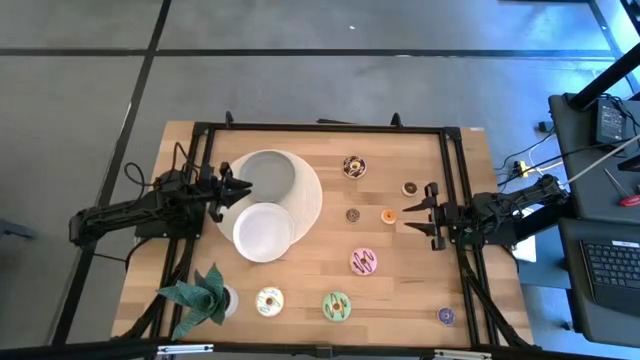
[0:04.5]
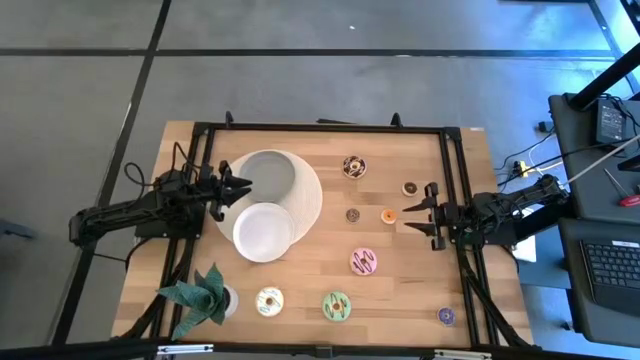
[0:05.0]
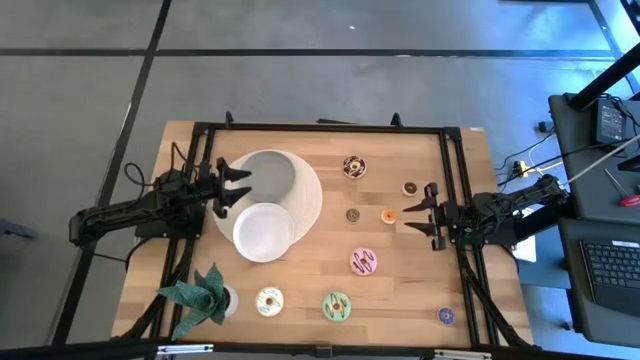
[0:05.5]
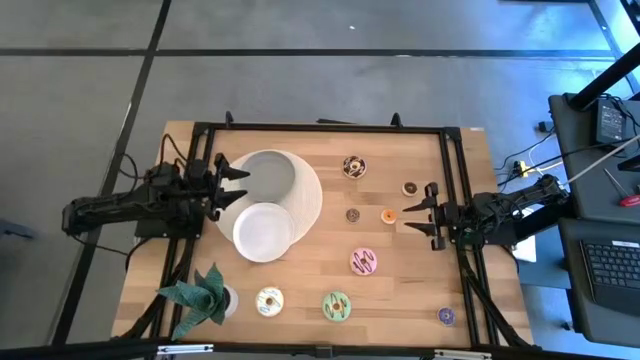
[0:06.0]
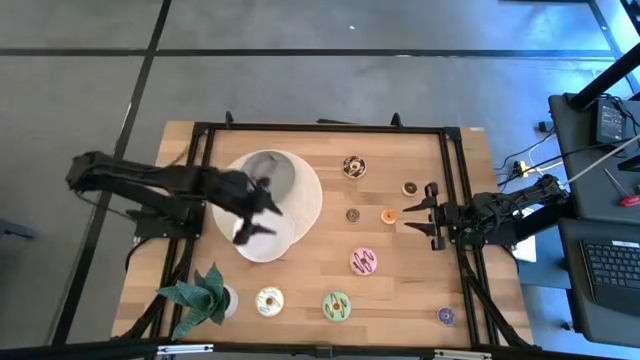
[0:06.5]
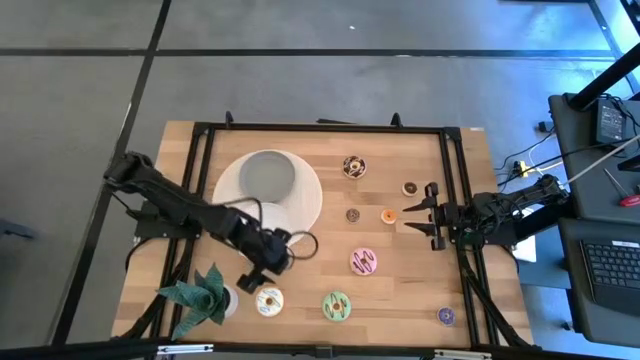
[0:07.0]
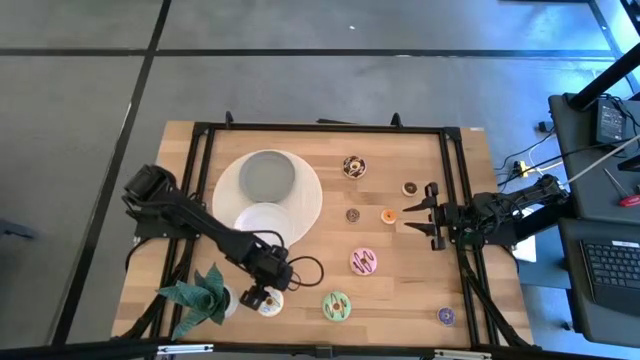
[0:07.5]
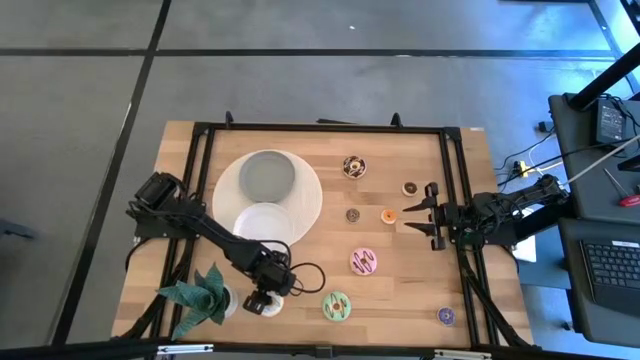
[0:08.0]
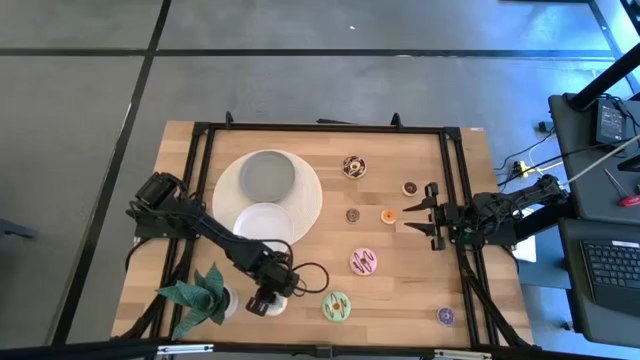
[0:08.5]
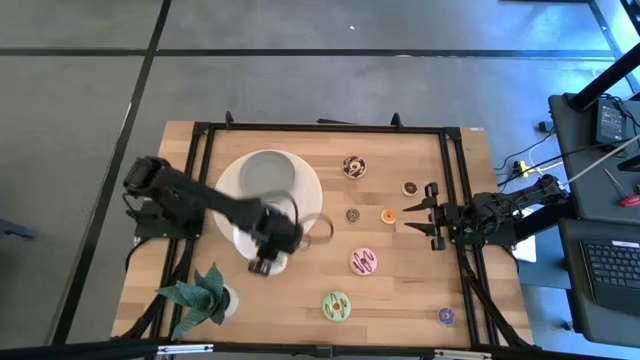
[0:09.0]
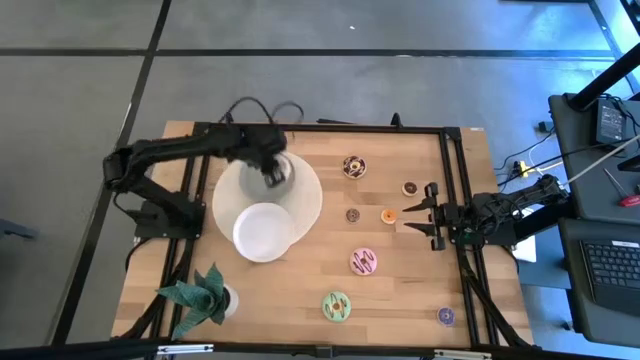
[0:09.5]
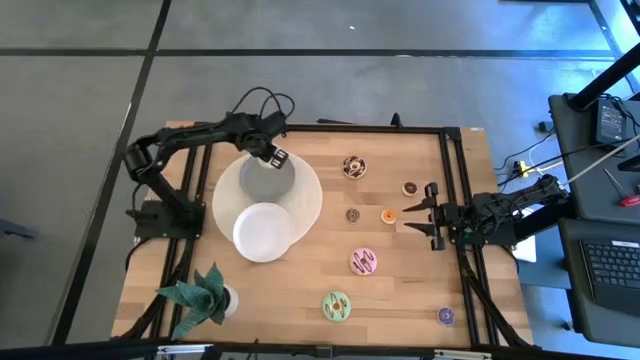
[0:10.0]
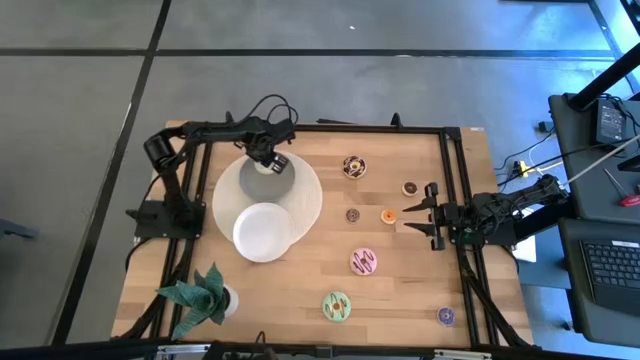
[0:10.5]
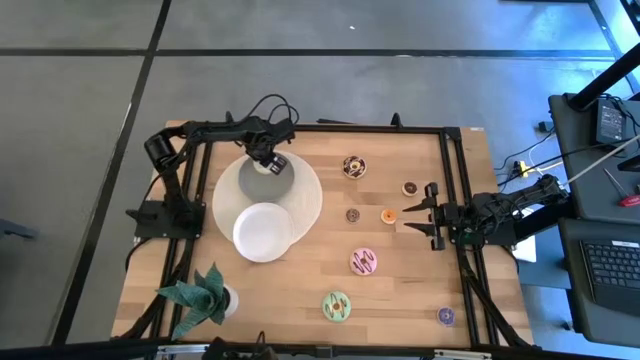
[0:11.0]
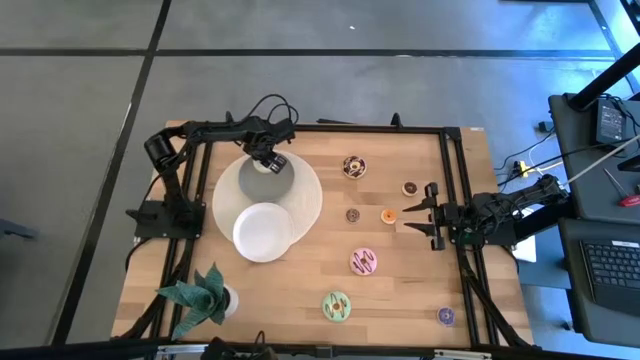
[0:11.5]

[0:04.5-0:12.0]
Task: Pick & Place donuts
Put the big white donut on the gray plate

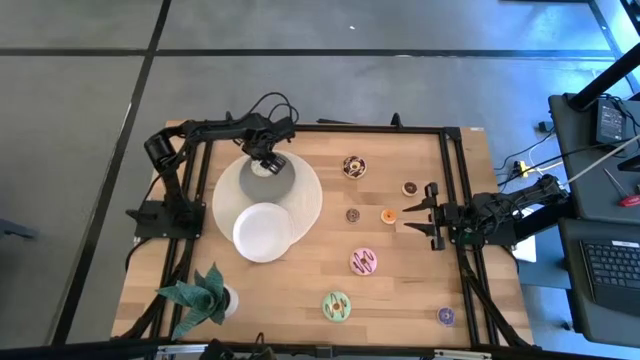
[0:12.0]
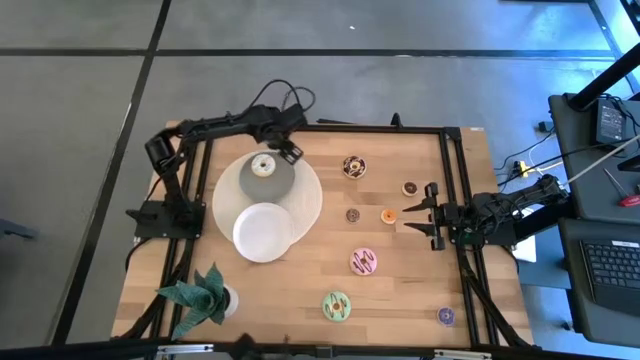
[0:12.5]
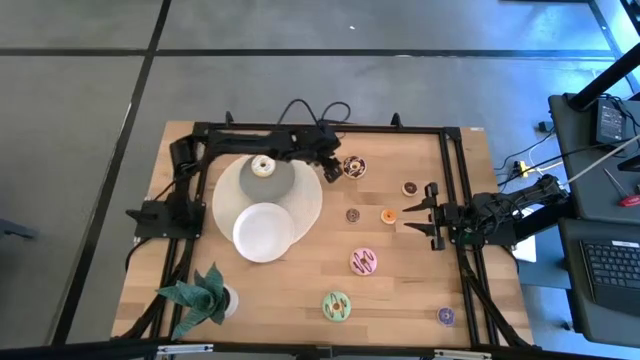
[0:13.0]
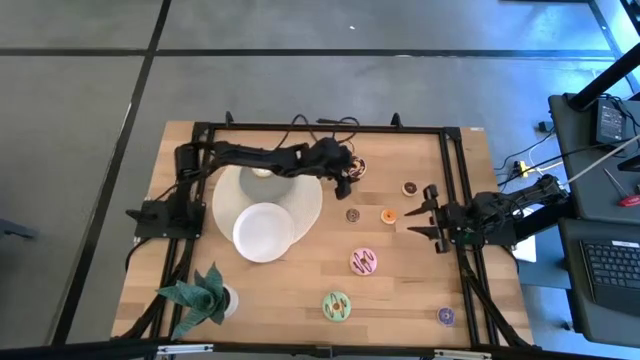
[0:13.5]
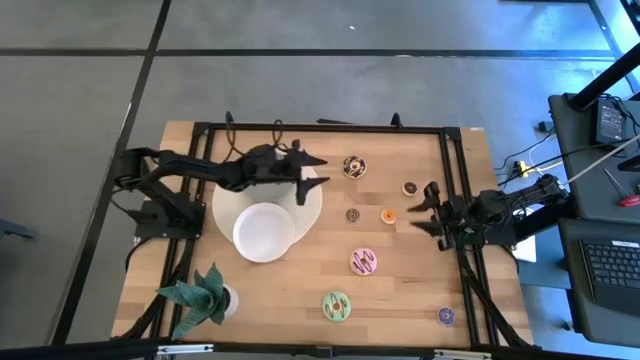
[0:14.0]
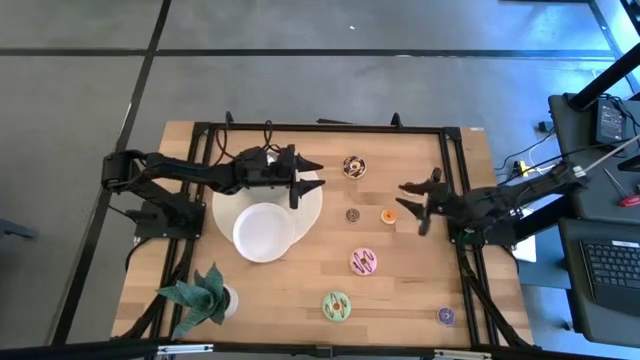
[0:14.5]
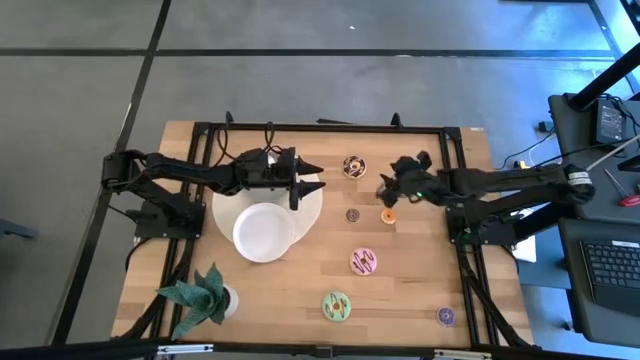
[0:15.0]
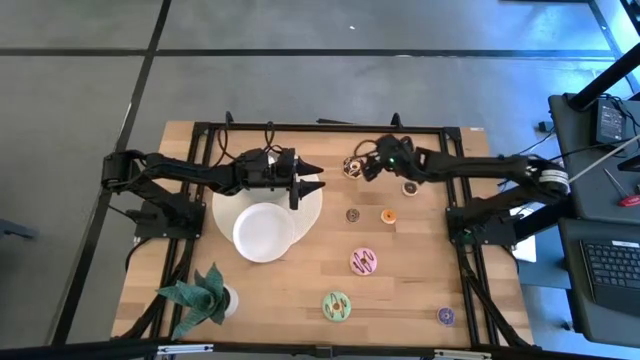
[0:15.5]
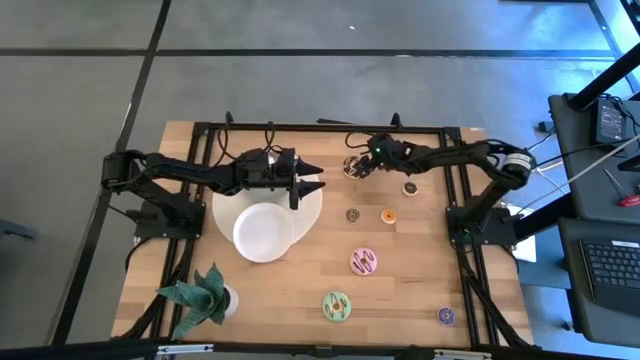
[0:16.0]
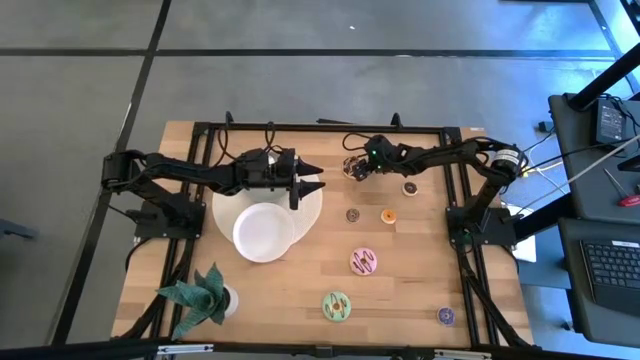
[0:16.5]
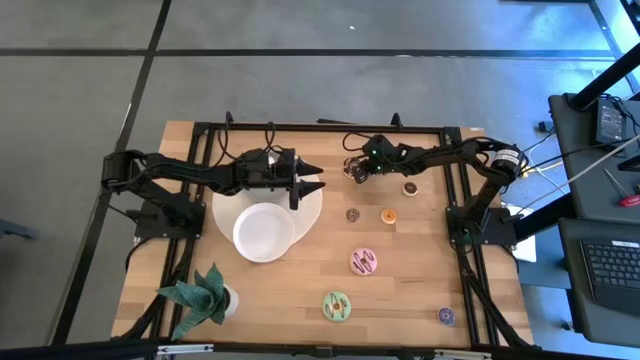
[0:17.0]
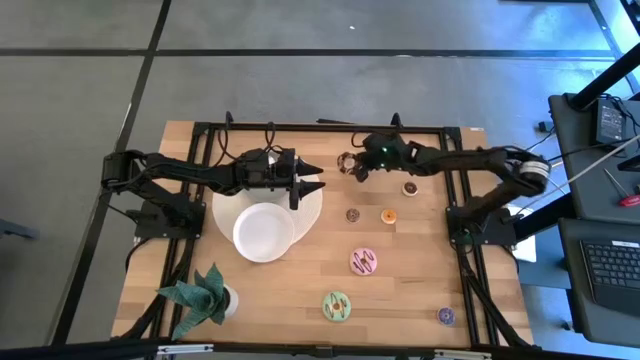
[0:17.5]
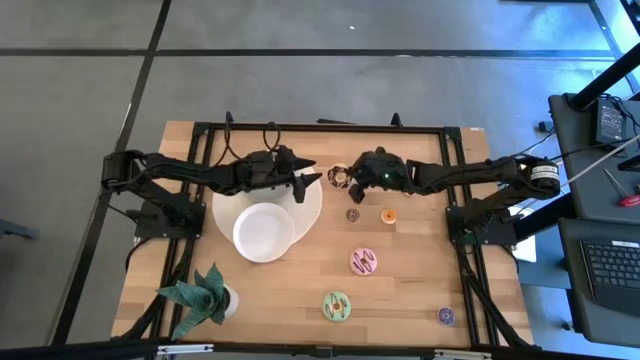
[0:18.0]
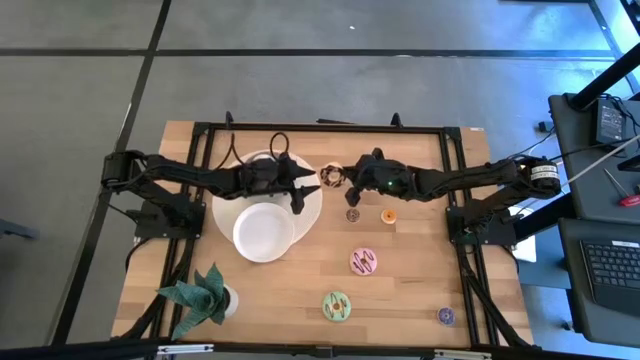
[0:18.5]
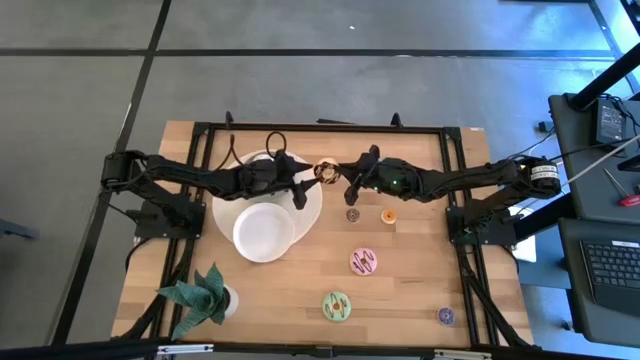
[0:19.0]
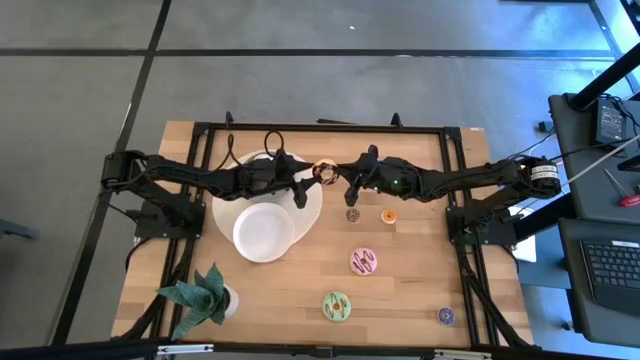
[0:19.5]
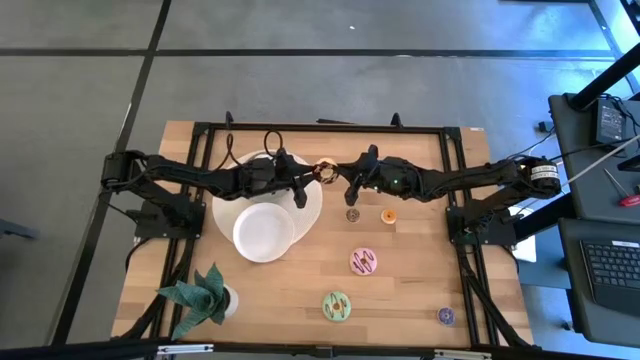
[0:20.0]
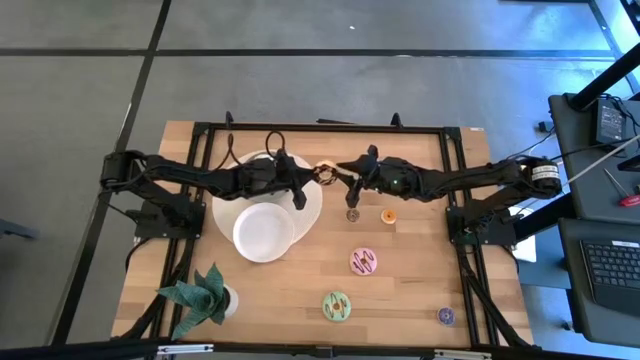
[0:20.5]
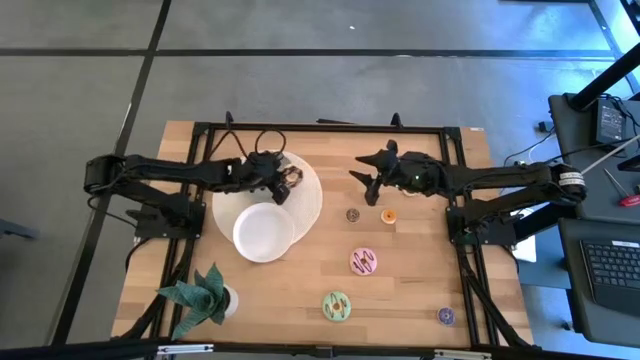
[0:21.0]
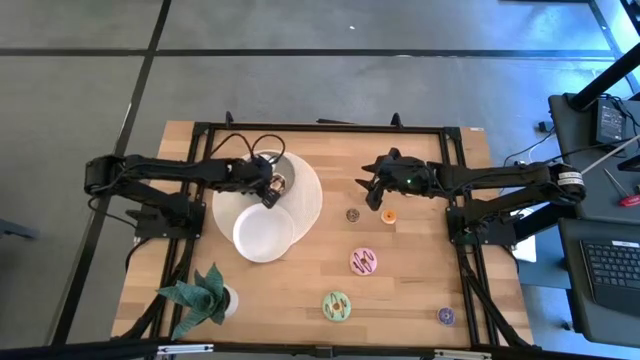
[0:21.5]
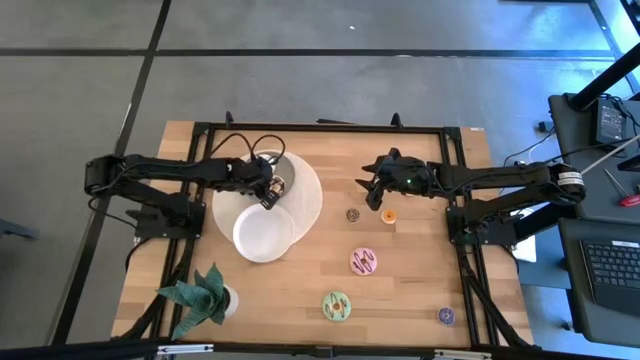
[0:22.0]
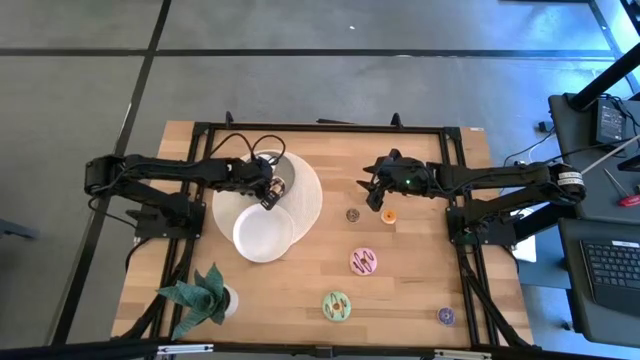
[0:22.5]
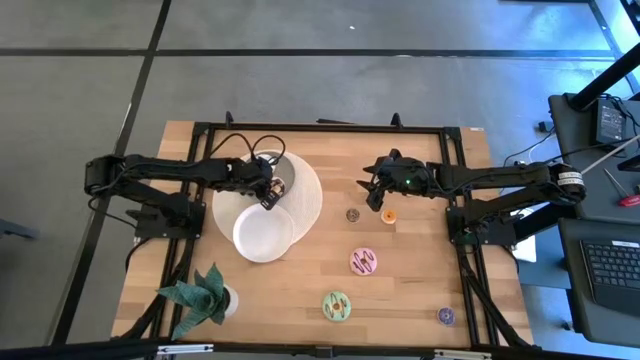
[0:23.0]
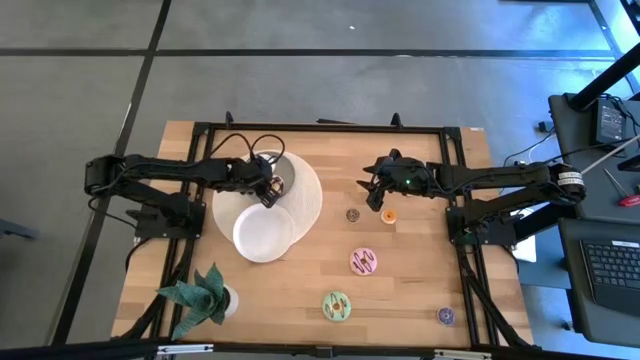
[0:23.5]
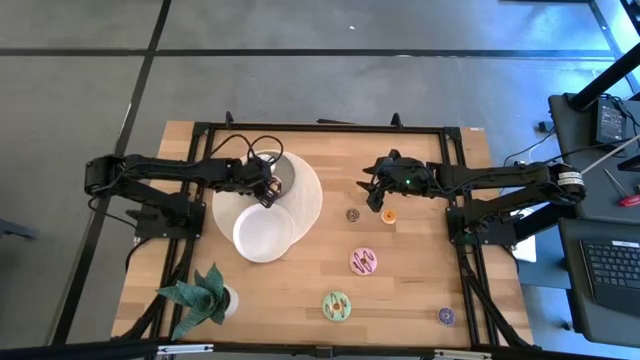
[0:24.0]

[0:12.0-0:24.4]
Put the big black donut on the gray plate
